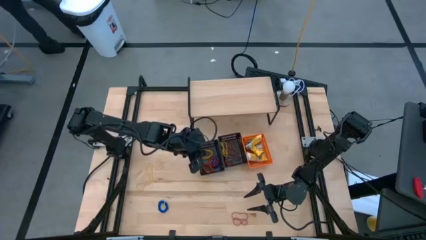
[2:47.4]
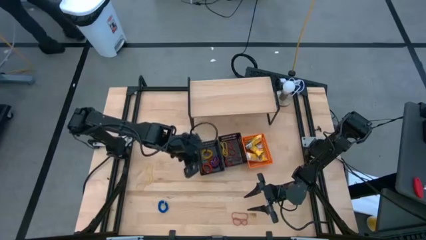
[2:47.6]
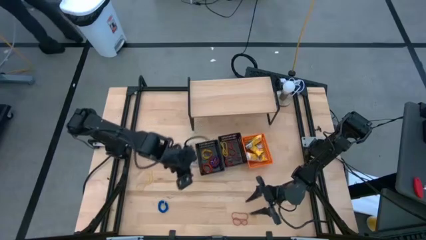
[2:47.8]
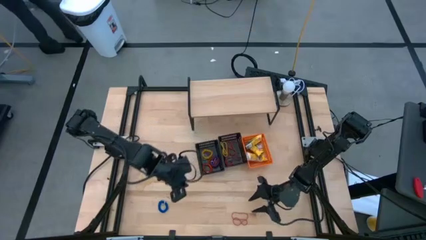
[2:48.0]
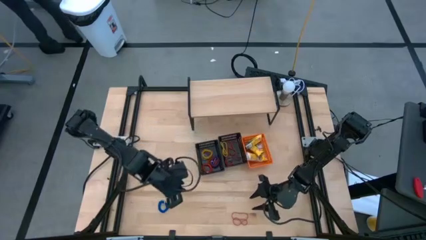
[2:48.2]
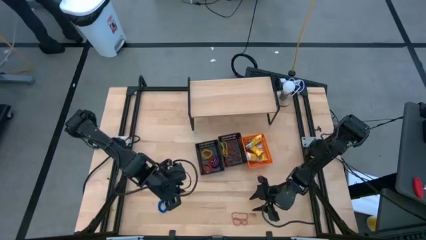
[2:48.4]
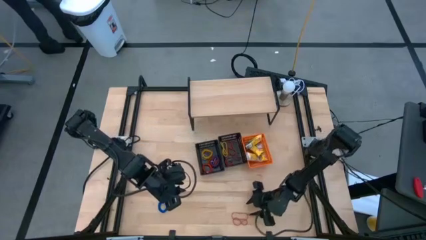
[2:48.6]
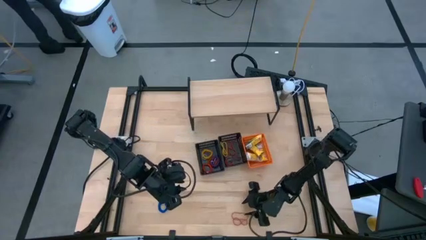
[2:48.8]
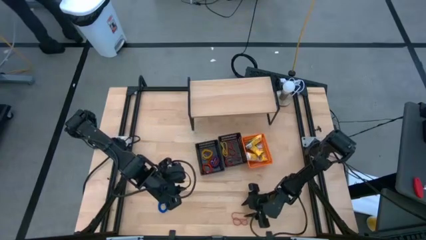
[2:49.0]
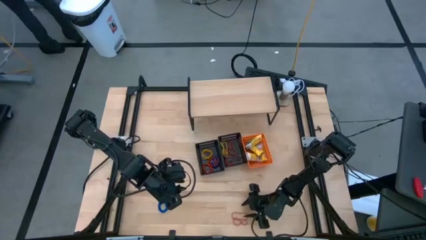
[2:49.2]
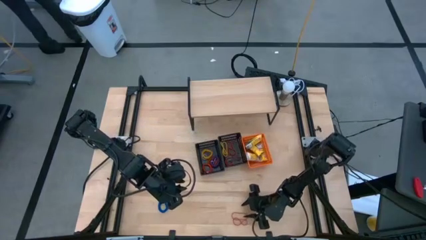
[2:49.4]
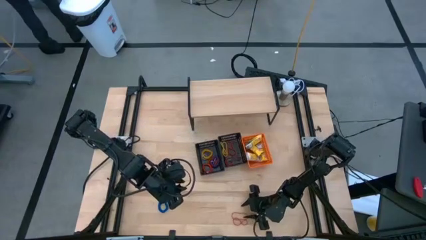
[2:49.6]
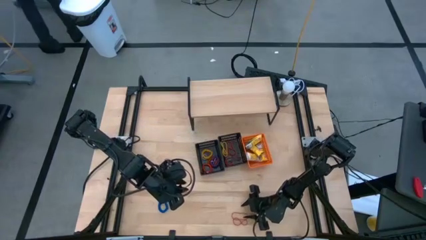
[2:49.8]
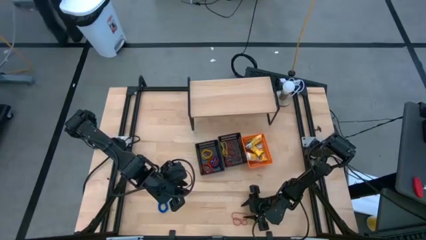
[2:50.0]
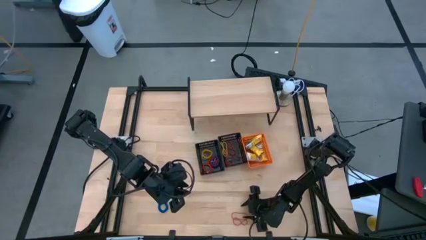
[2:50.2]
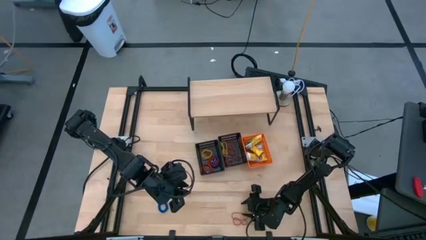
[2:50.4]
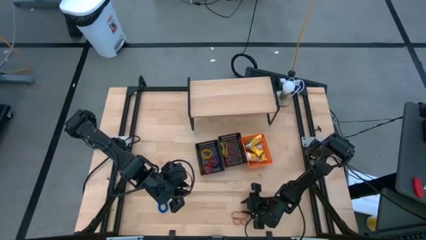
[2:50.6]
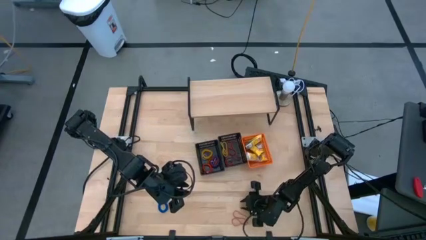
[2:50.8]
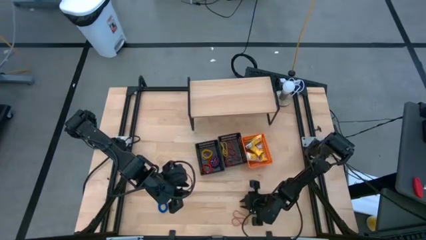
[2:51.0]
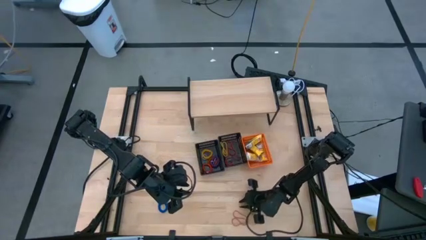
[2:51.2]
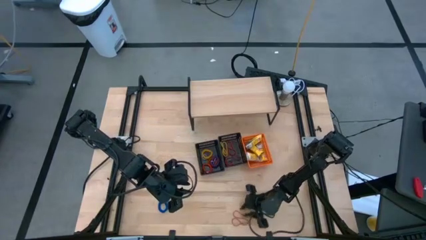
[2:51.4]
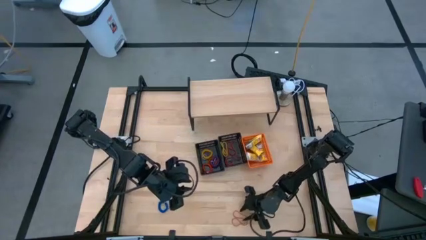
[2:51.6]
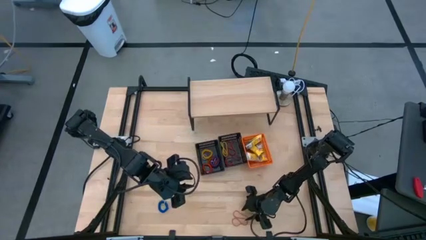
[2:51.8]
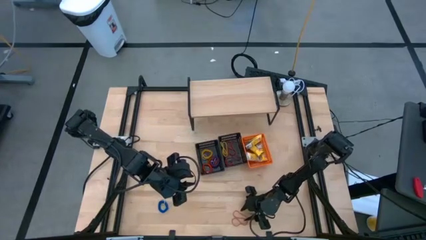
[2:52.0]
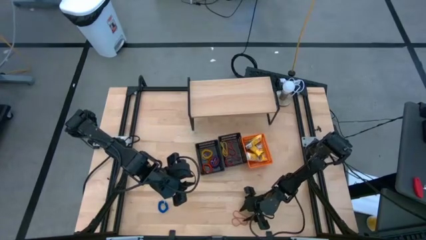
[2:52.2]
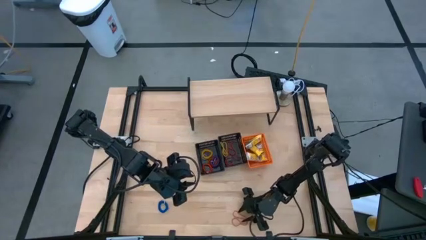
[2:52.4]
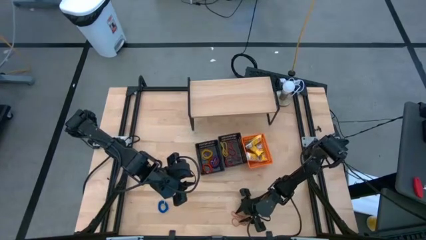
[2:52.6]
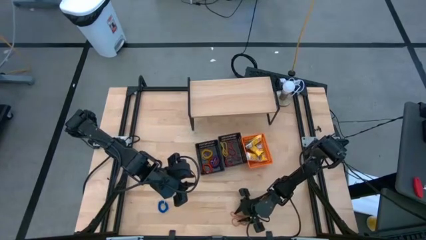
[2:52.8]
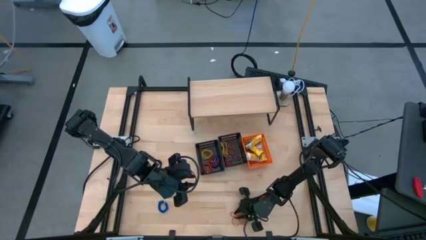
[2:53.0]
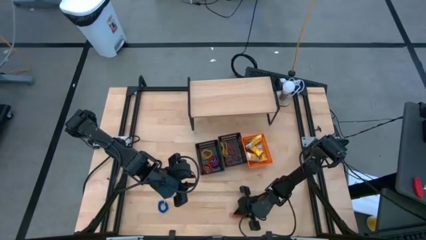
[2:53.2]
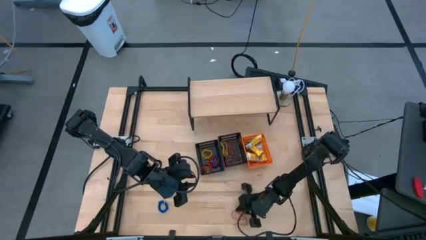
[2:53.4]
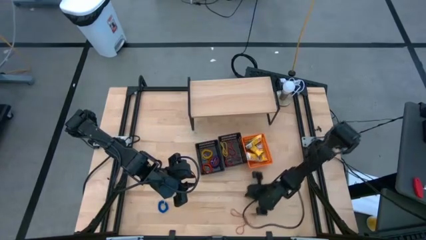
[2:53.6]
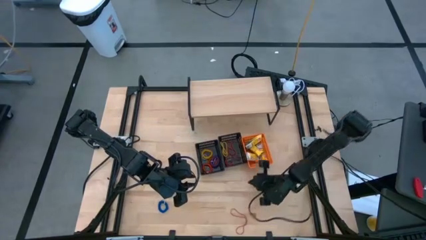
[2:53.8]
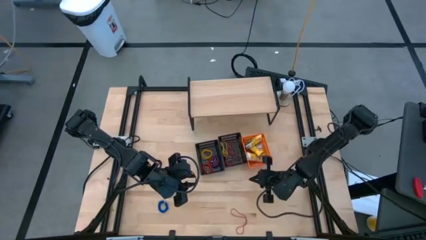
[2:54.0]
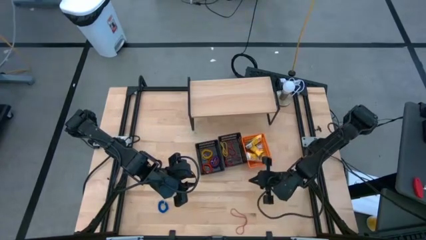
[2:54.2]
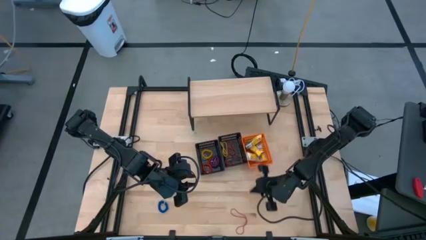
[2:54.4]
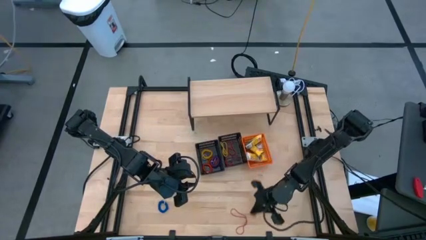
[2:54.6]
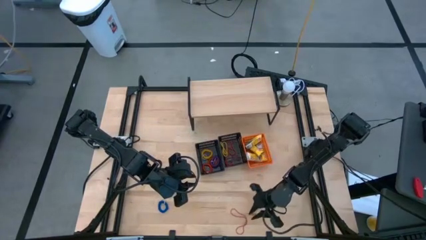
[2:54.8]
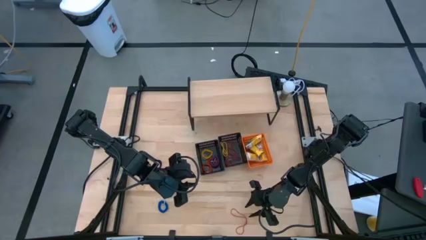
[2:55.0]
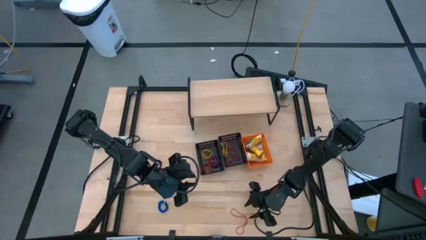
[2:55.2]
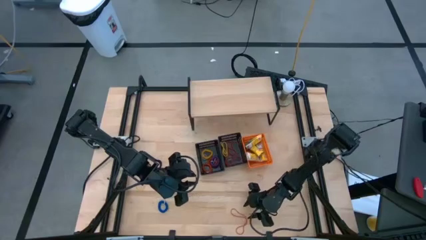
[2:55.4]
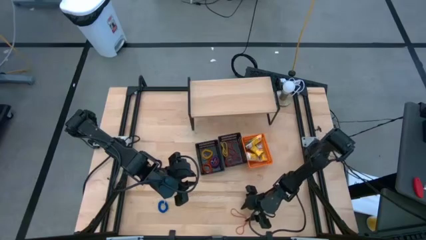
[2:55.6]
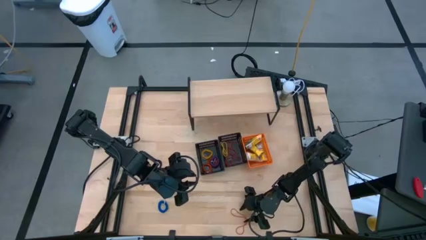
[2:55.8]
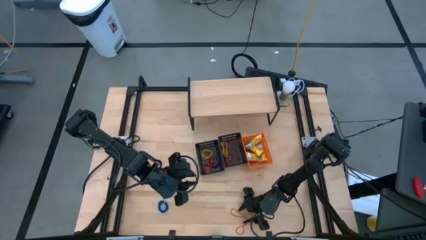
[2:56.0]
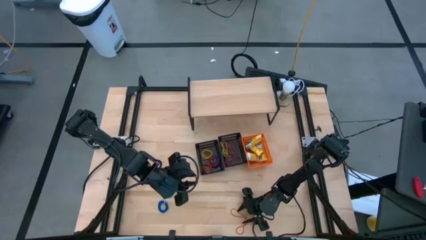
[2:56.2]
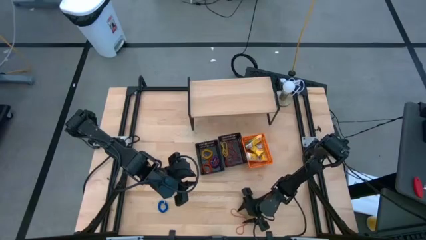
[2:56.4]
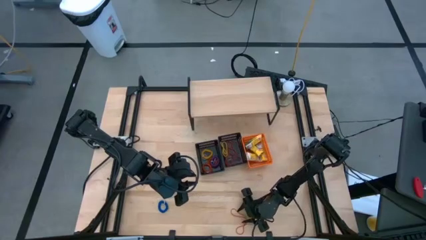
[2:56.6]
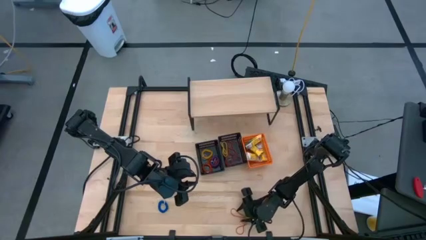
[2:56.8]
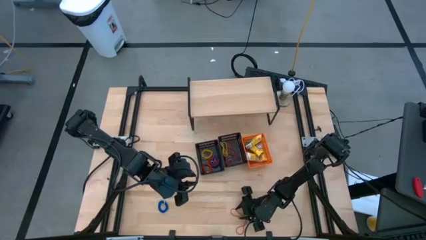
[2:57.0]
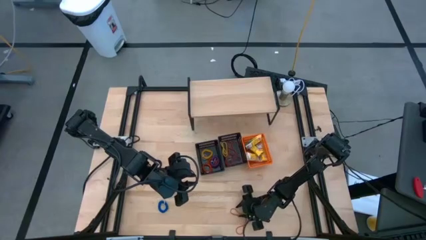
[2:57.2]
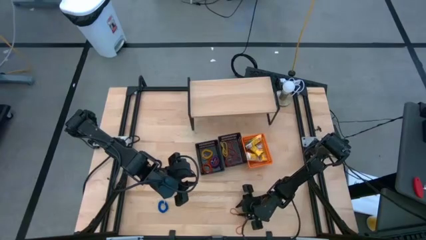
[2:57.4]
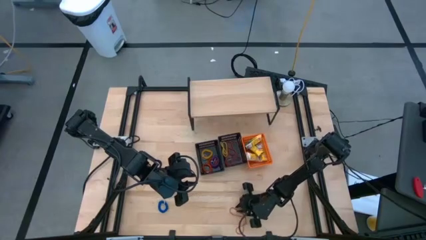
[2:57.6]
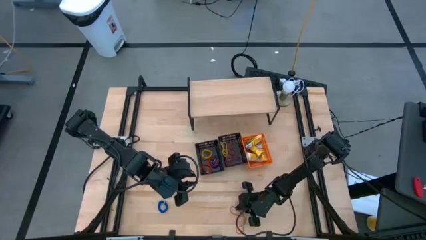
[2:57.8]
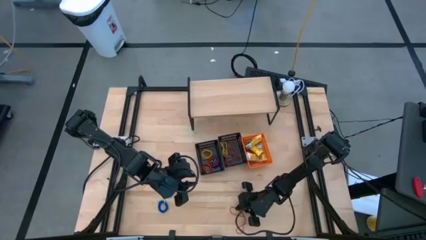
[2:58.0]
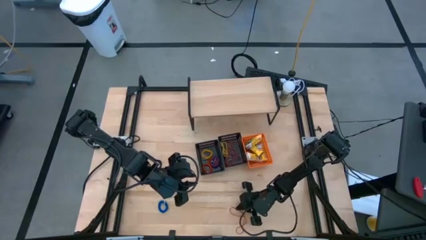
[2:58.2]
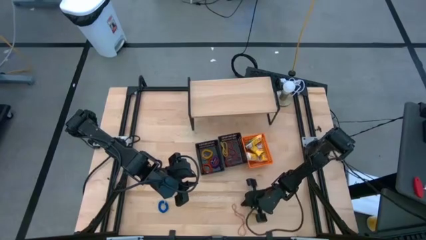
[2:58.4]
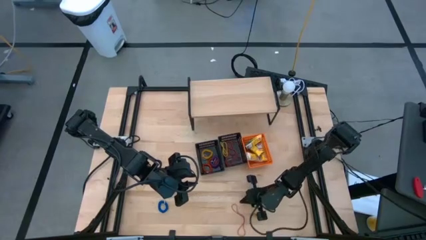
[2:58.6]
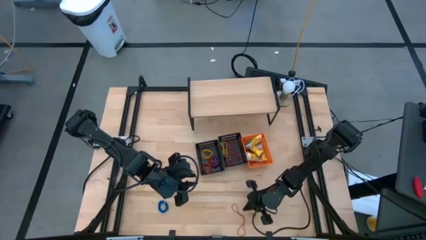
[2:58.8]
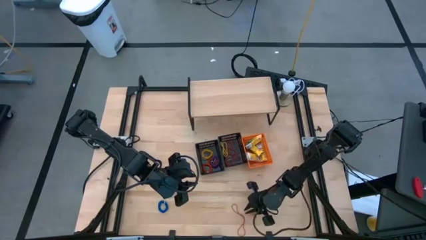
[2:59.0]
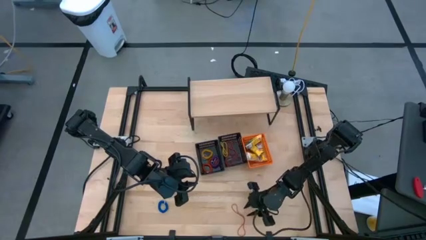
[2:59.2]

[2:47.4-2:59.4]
Task: Pick & Place Office Desk Supplies
Put the orange rubber band into the right black bin

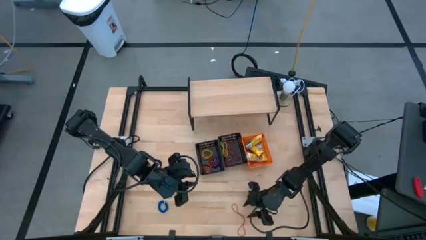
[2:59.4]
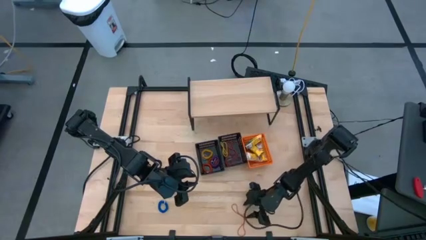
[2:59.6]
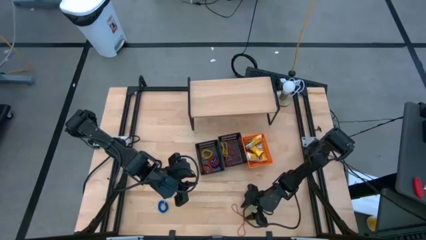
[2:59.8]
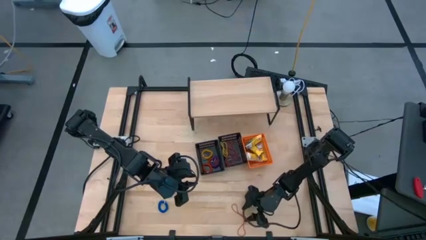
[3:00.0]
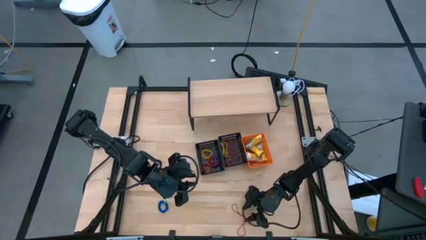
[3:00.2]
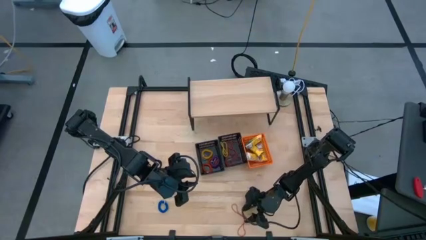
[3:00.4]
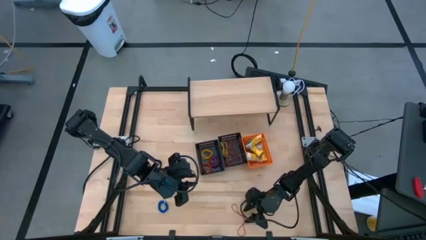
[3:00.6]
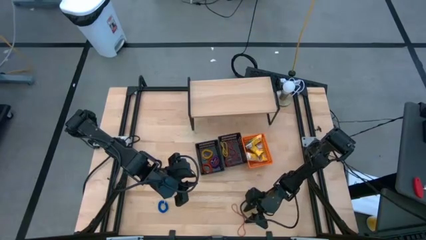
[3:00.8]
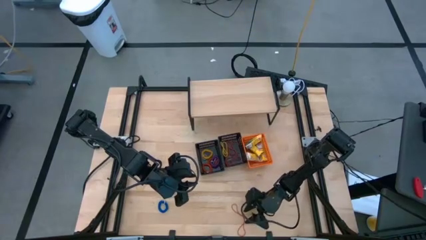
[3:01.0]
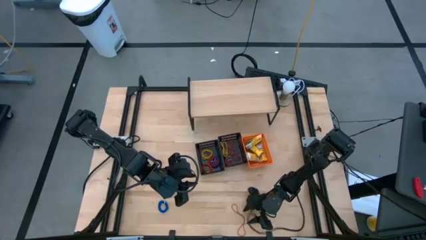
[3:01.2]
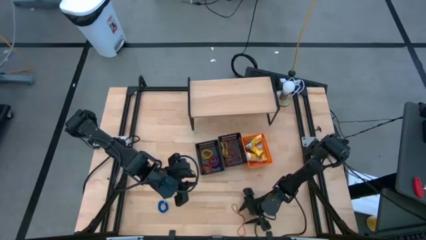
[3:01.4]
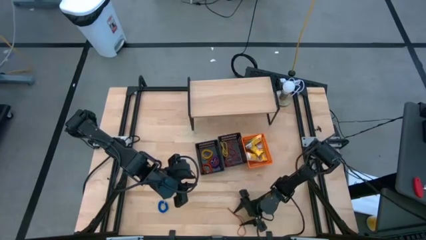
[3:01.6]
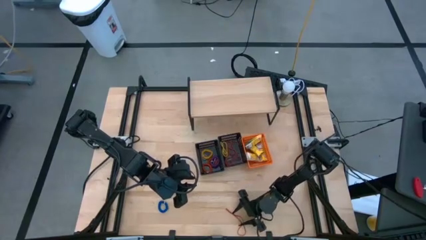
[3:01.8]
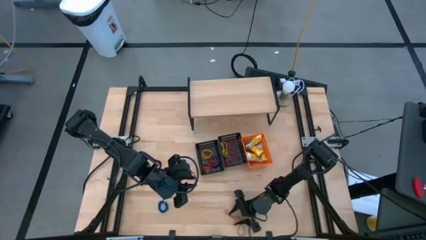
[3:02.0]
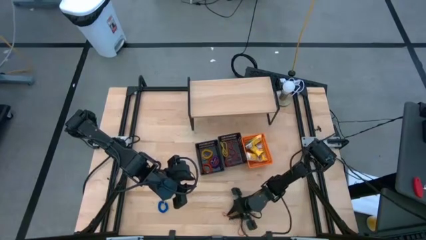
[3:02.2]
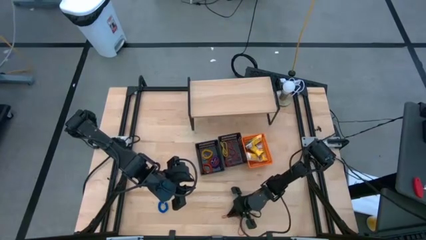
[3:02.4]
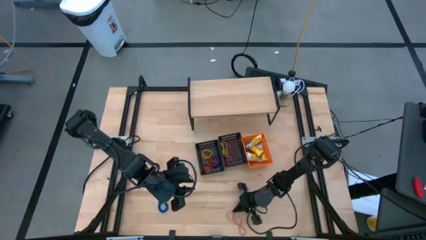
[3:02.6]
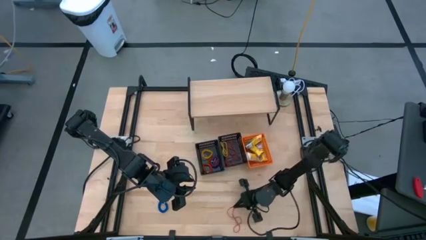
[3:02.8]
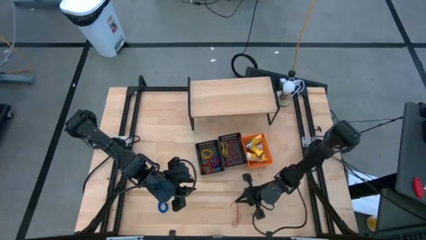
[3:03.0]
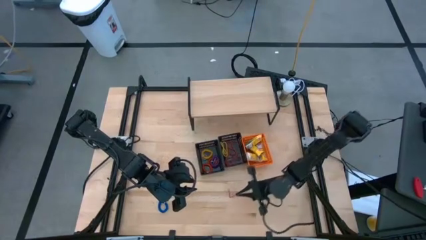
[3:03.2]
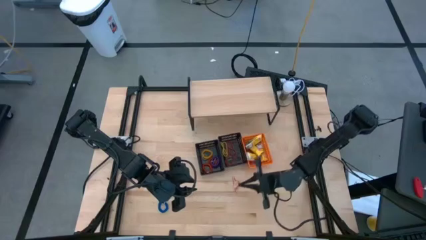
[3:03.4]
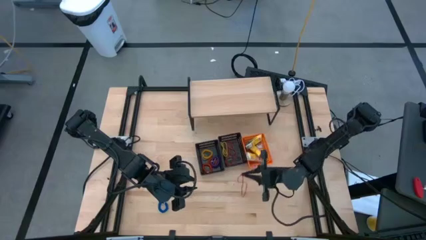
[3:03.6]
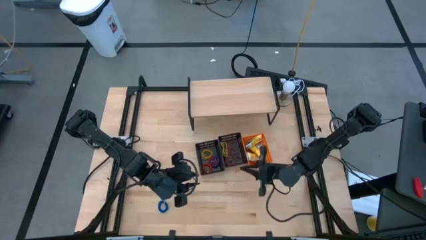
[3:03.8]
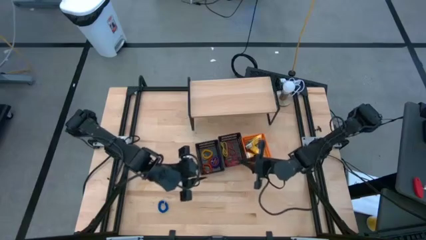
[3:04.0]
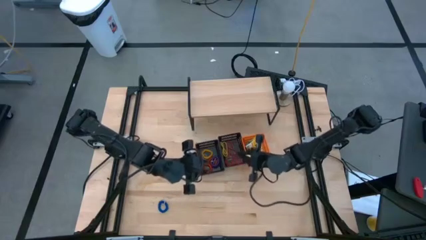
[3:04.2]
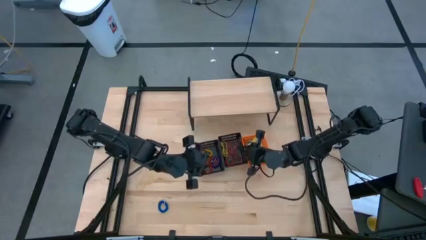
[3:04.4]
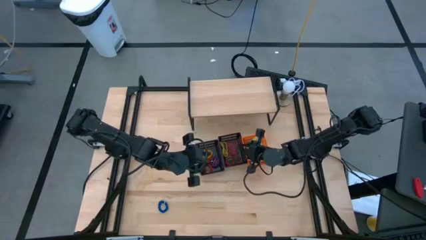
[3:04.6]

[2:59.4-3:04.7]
Put the orange rubber band into the right black bin
